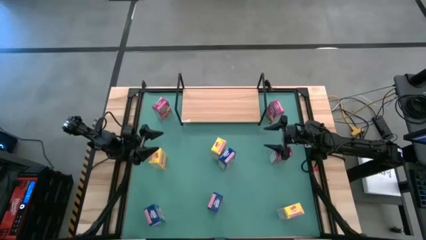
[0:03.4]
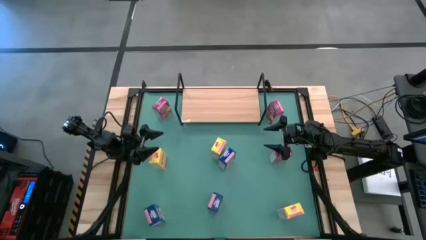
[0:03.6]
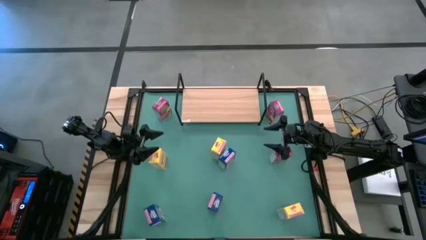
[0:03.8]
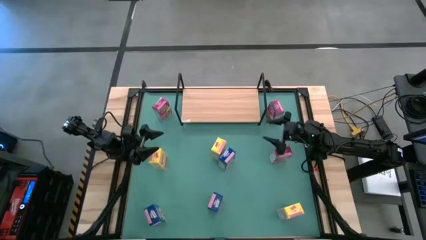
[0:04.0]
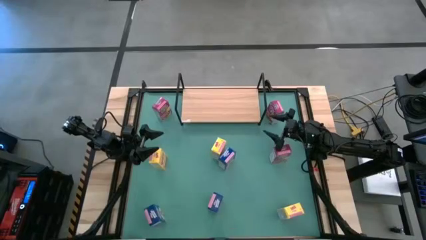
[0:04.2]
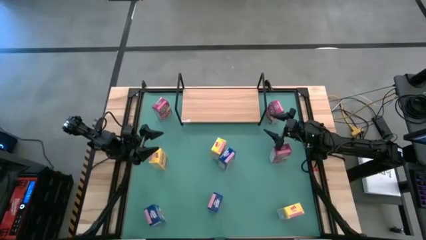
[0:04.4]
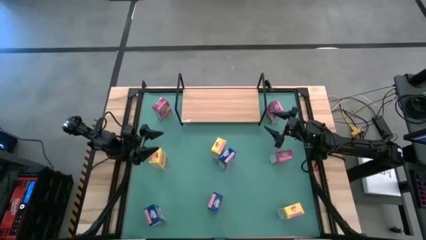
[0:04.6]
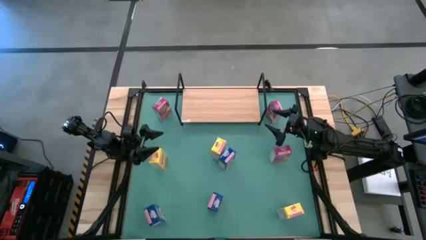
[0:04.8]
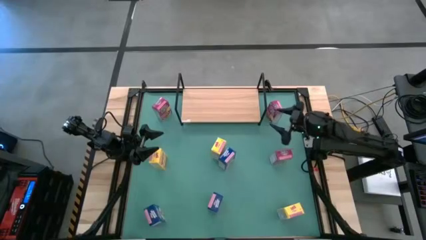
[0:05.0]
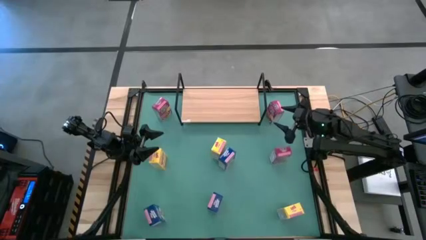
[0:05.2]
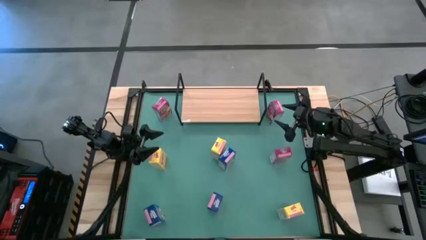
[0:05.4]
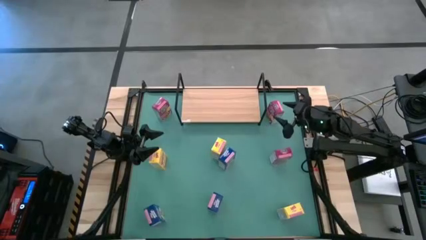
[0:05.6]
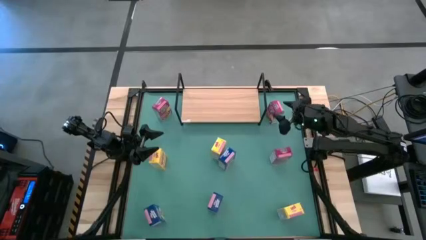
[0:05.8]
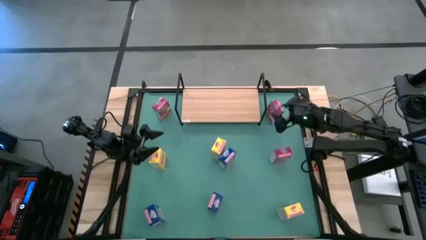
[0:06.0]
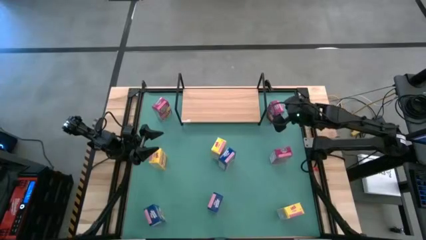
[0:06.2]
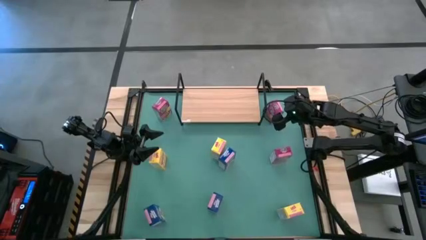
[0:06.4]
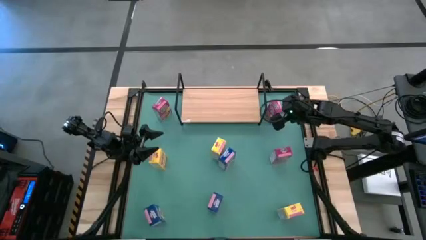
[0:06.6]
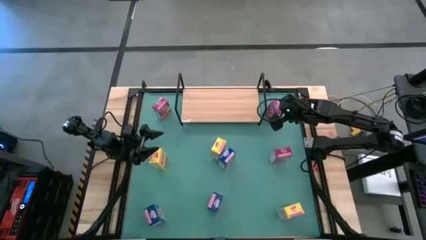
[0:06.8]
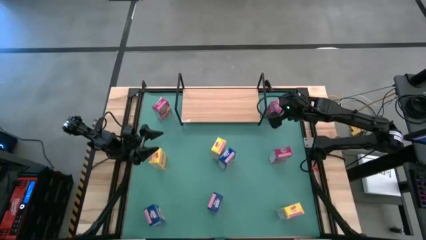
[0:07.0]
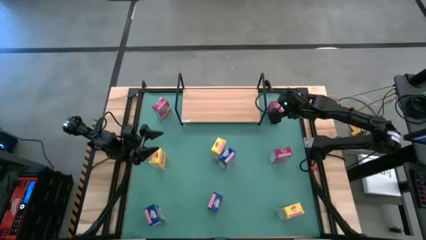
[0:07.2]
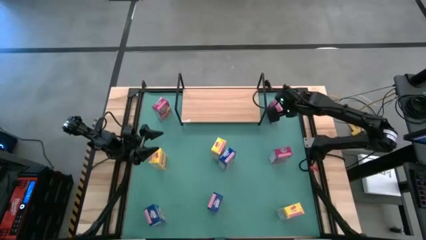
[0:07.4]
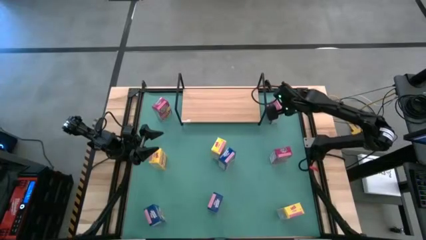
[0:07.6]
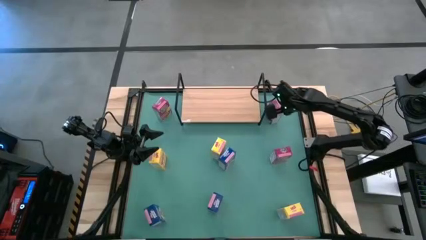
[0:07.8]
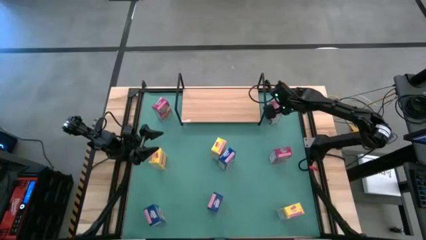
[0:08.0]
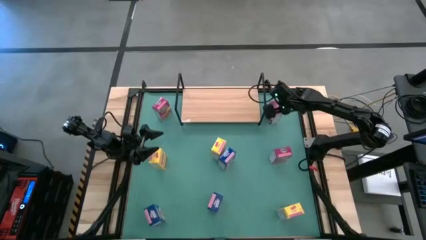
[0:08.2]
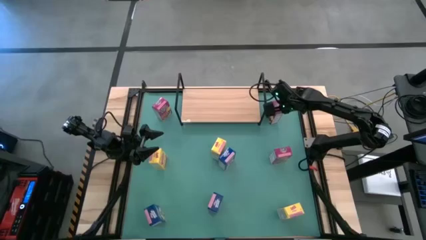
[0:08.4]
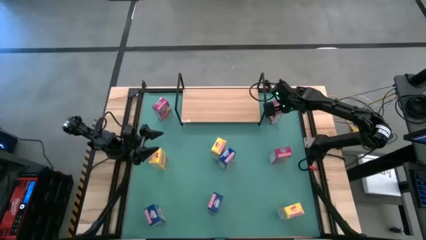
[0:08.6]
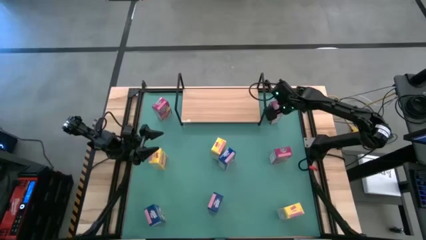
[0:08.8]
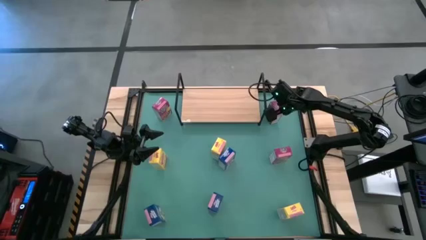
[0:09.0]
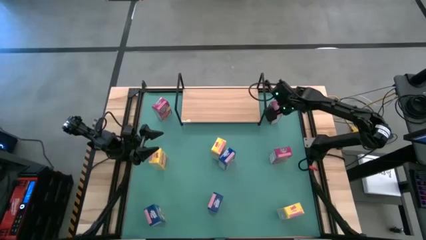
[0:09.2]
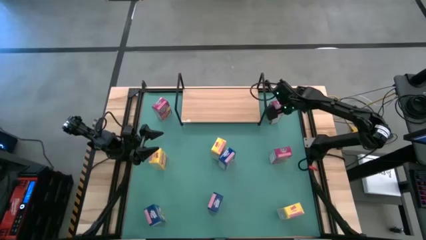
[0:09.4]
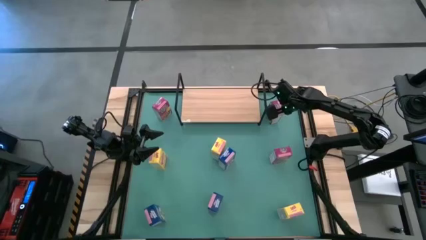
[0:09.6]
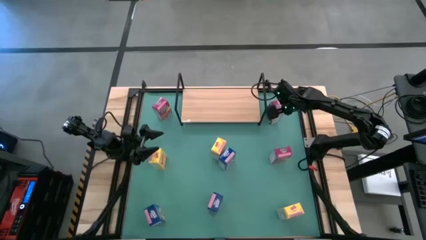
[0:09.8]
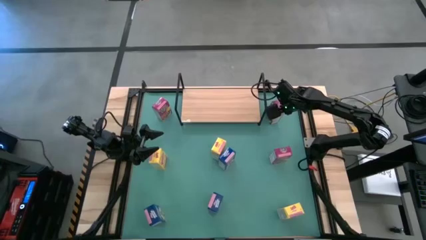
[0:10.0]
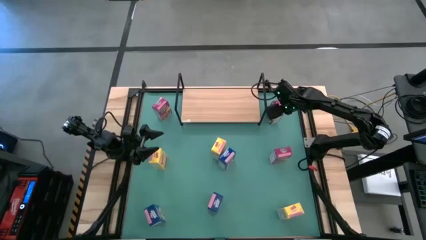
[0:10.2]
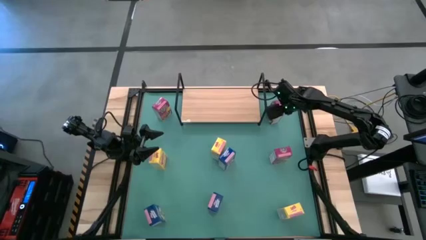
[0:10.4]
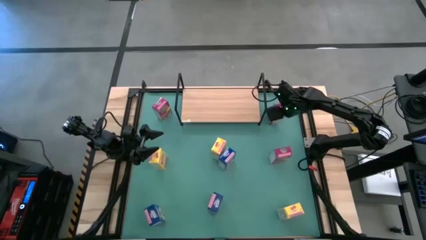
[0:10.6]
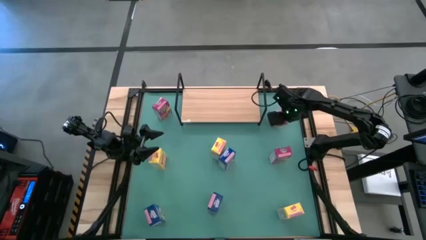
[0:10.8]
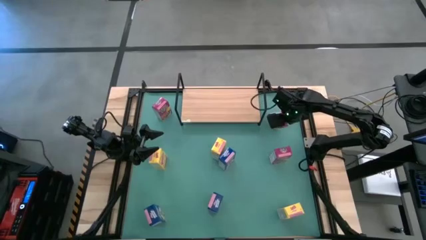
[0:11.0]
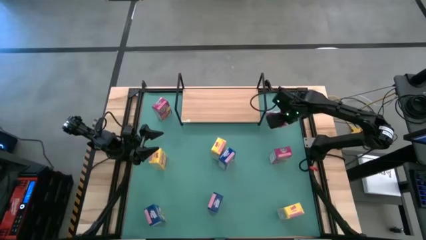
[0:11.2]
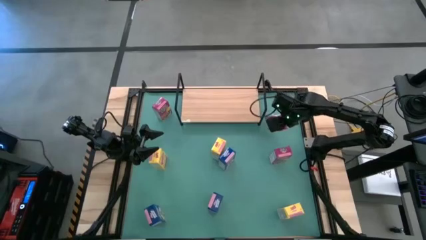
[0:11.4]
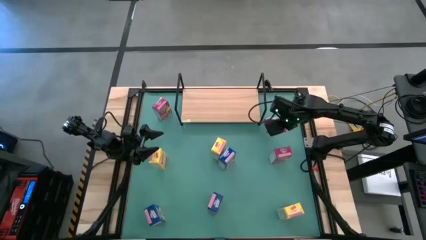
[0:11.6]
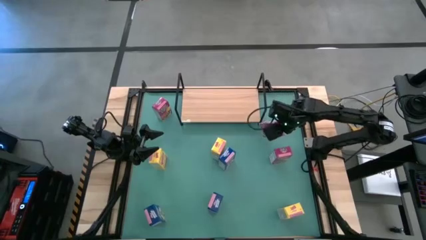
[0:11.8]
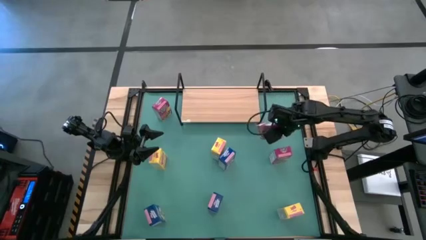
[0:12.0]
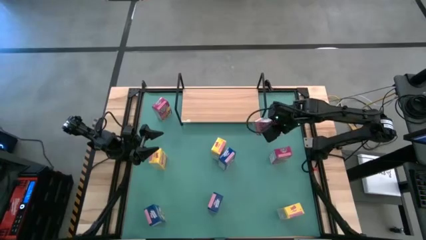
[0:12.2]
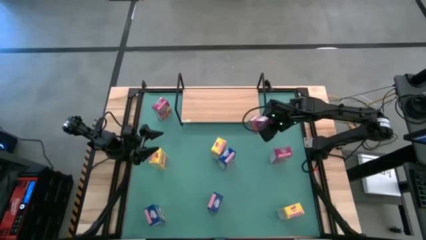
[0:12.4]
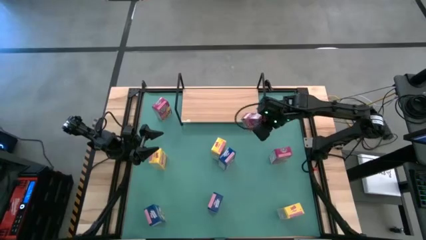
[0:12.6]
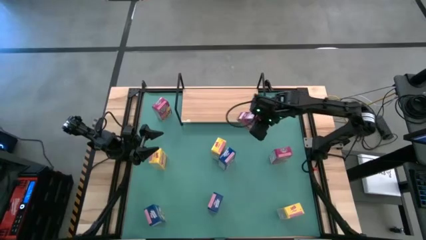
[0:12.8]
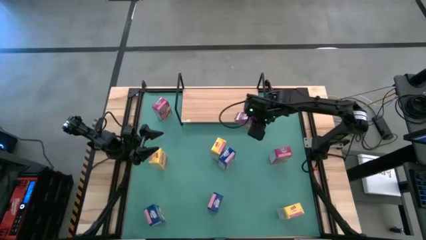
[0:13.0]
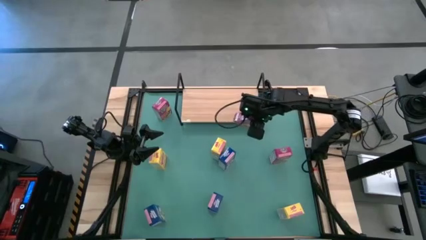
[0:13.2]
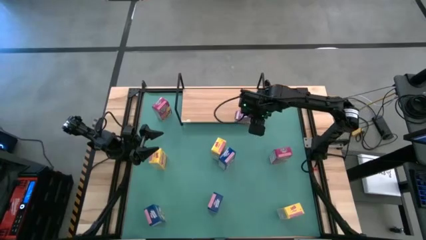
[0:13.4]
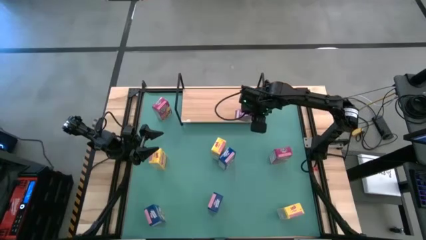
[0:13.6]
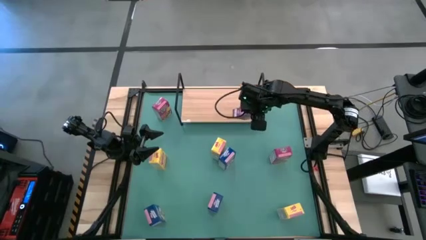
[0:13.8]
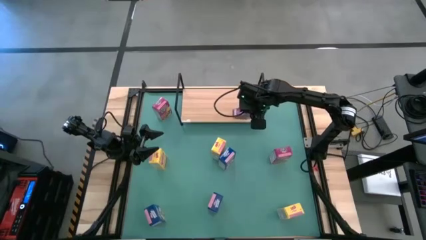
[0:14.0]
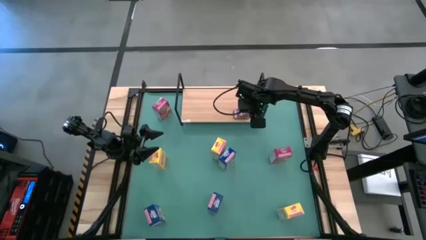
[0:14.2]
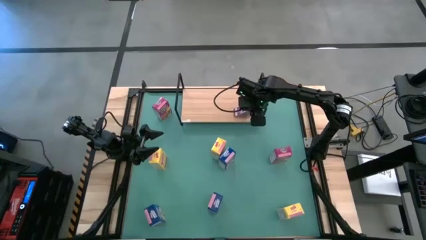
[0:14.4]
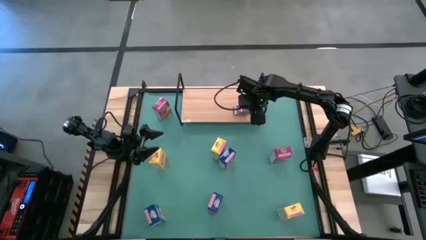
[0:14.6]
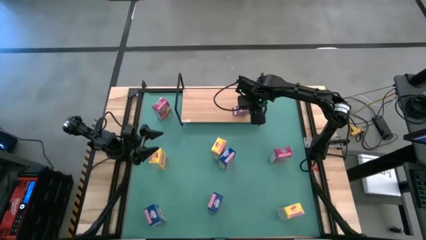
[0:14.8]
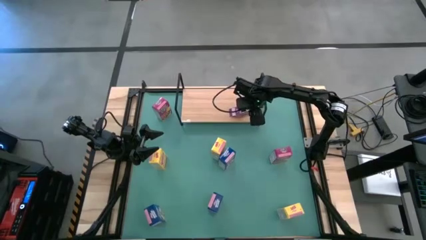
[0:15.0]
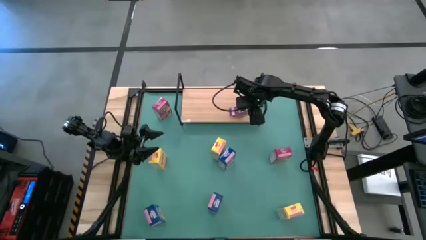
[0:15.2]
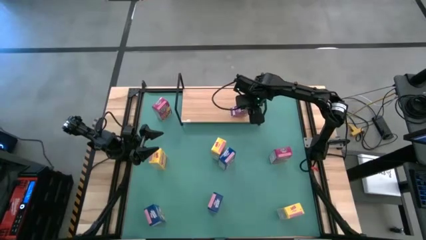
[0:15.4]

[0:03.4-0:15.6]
Task: Stack cereal on shelf
Put the top right pink cereal box on the shelf

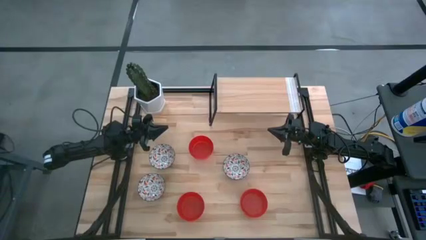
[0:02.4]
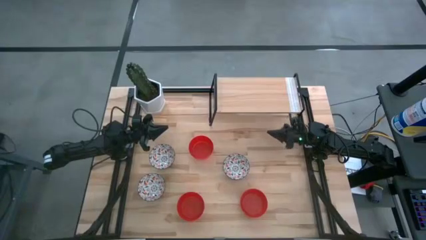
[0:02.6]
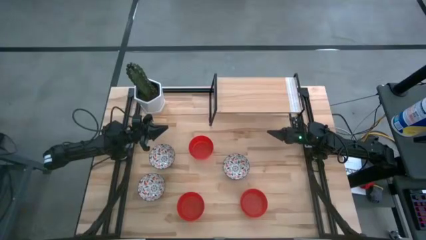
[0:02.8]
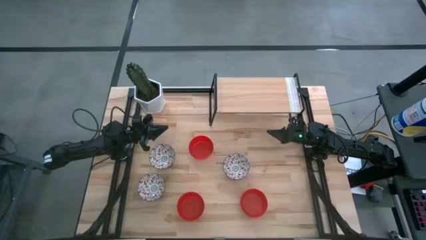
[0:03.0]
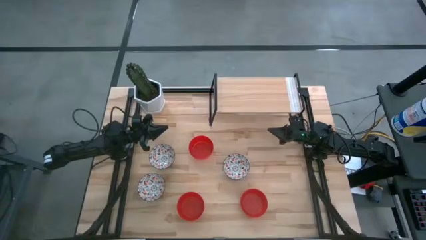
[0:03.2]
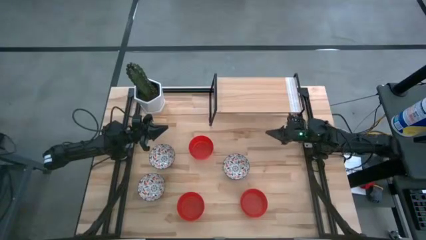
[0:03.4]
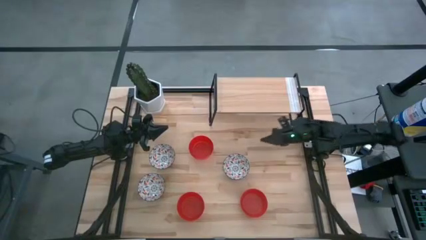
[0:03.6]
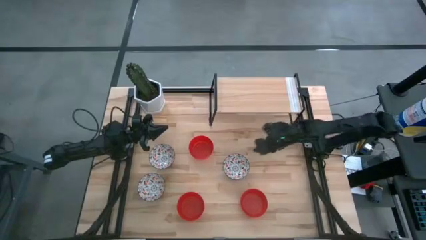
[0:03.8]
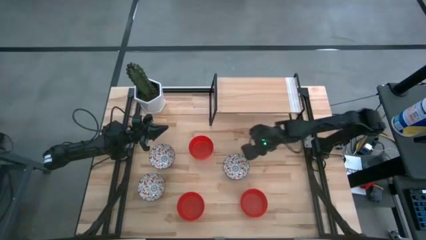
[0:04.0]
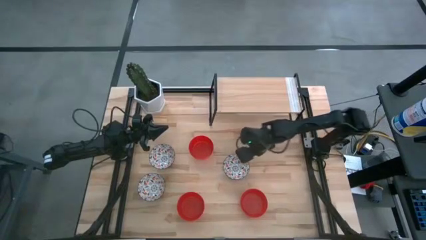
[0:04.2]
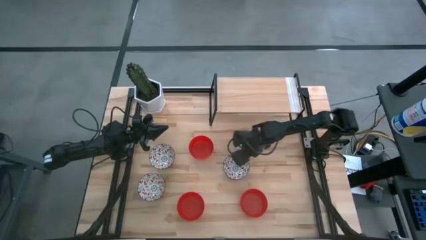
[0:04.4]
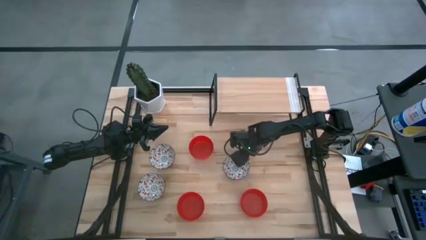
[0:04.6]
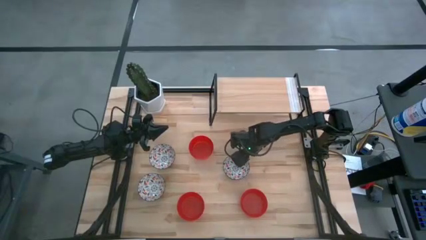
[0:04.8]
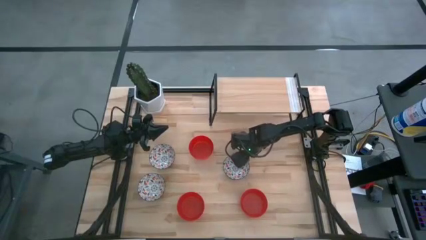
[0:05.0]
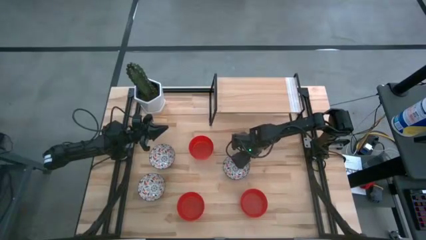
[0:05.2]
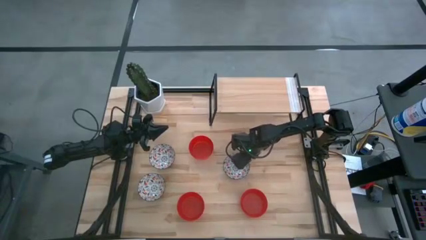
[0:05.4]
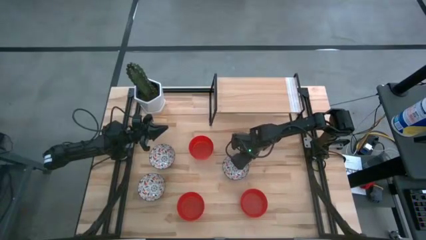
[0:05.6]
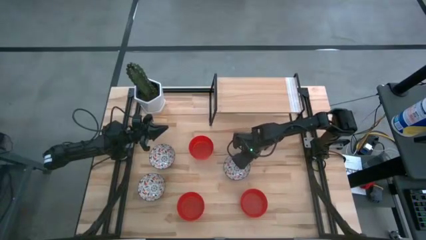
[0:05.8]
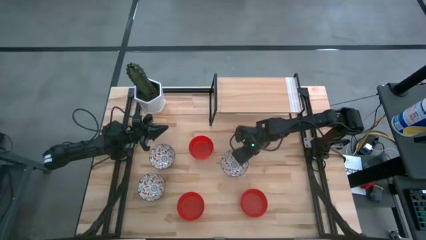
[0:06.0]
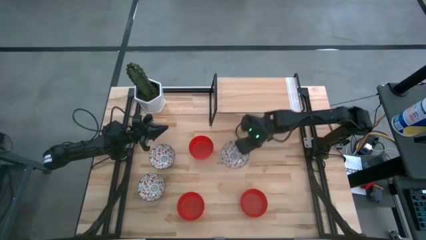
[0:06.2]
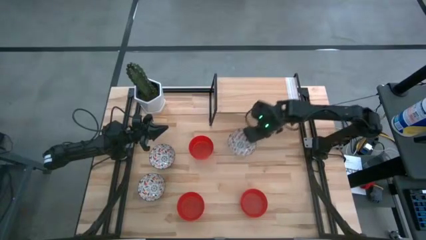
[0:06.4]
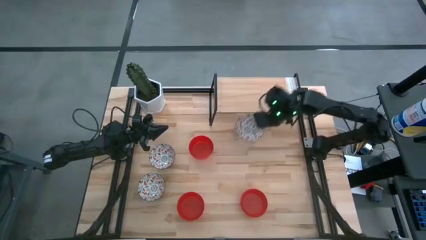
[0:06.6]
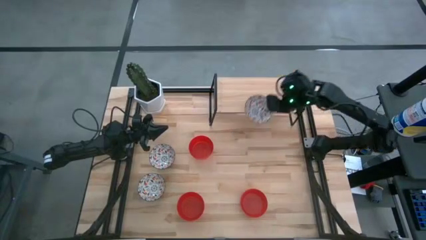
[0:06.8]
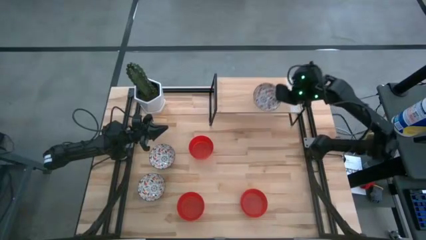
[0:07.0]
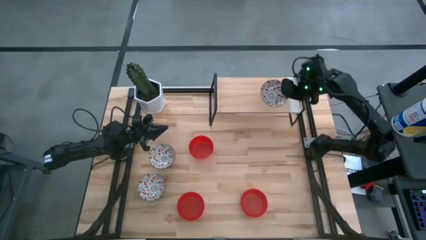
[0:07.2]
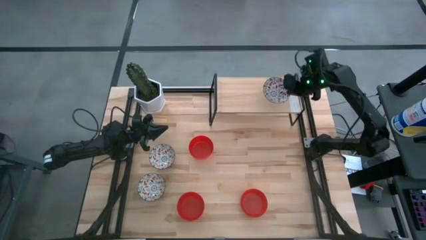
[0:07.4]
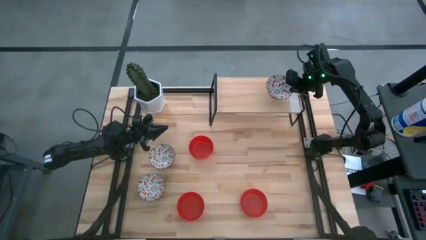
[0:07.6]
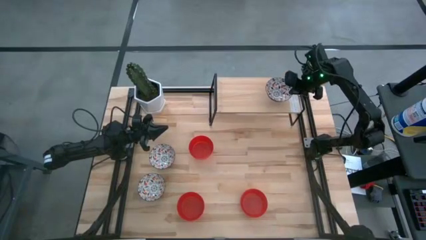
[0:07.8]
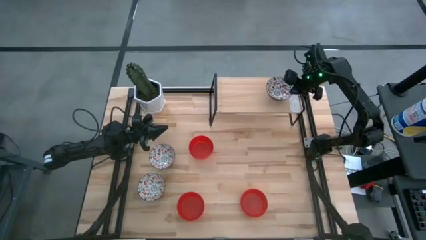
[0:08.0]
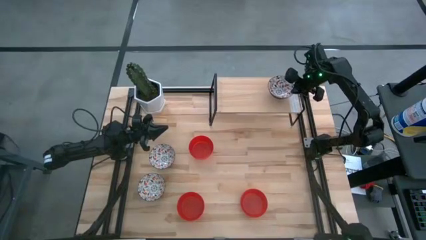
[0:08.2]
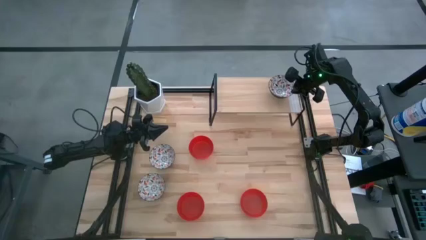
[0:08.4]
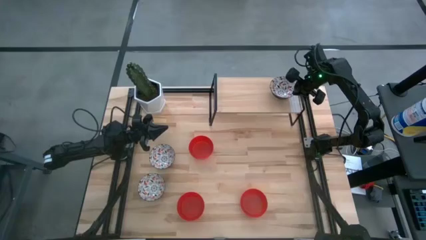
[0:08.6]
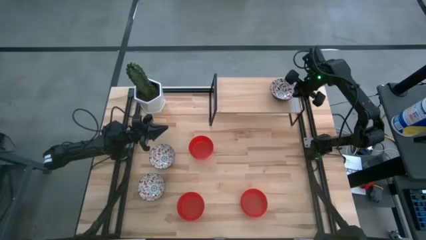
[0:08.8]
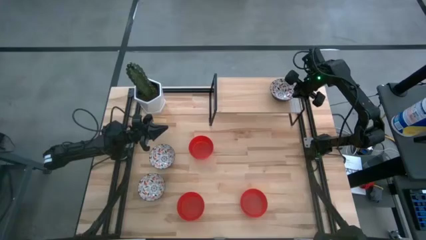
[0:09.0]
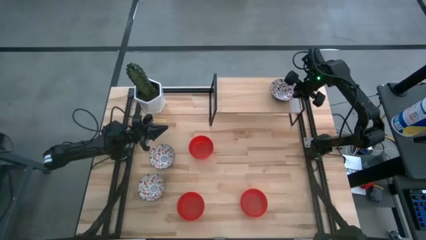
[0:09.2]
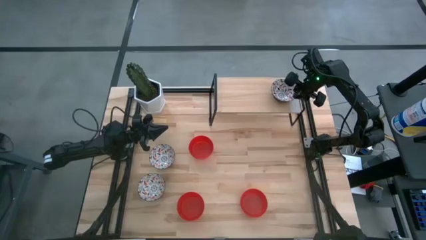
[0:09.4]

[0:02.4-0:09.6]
Task: Pick & Place Mini bowls
Put the middle right white bowl on the shelf
